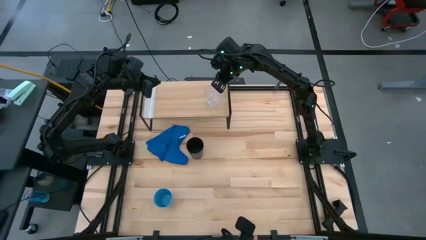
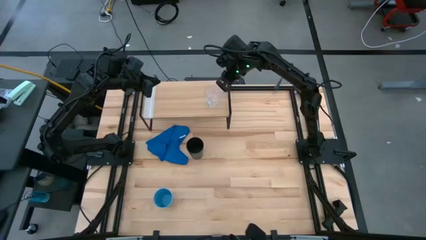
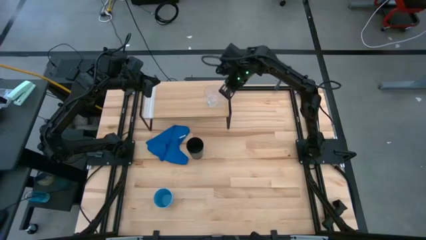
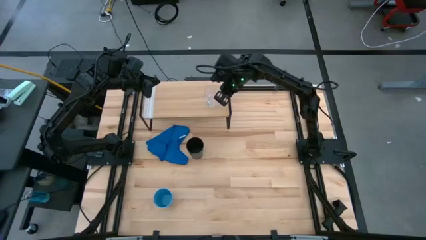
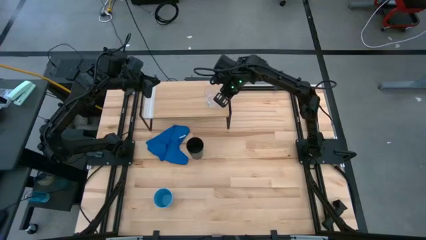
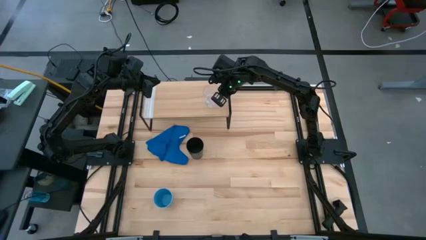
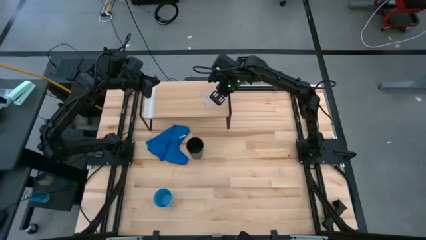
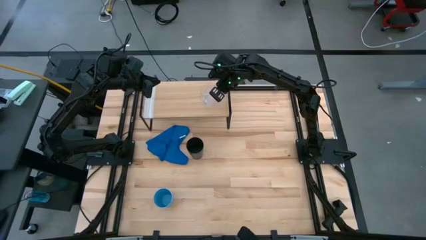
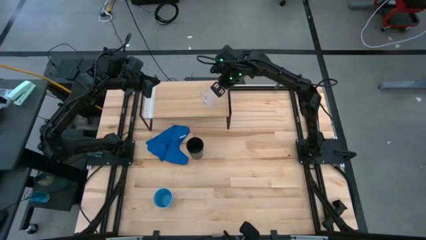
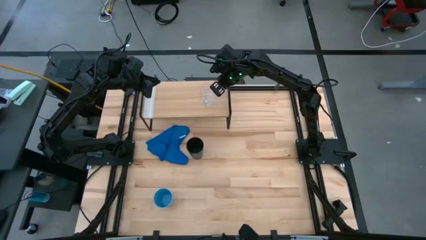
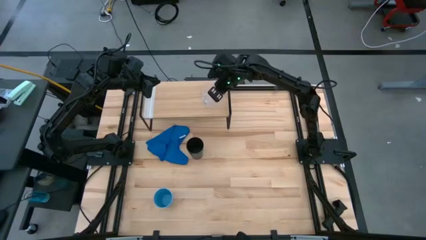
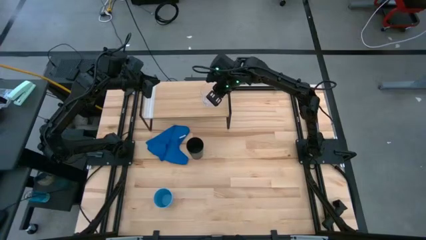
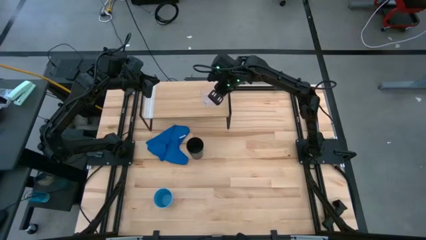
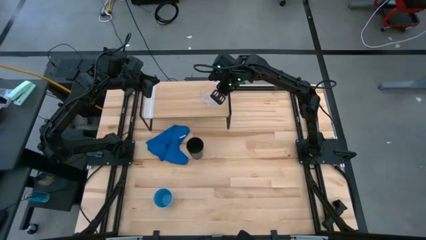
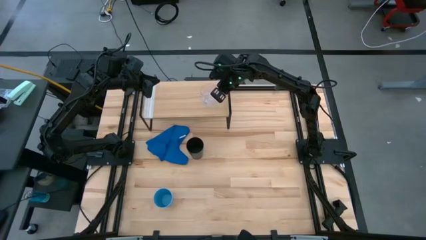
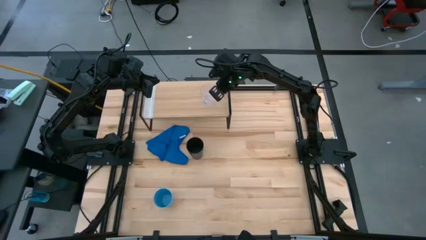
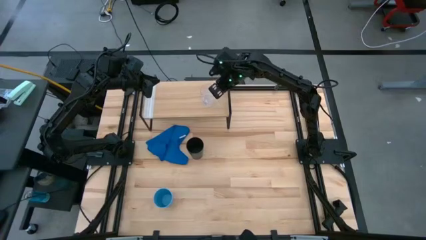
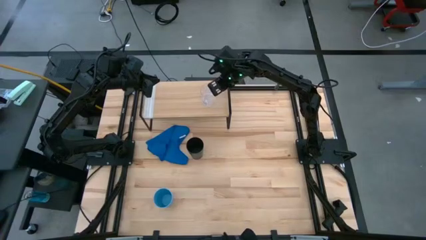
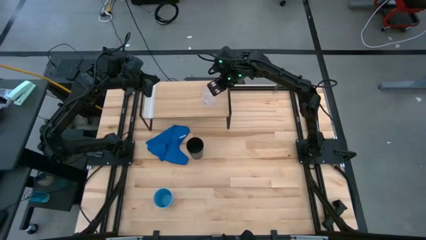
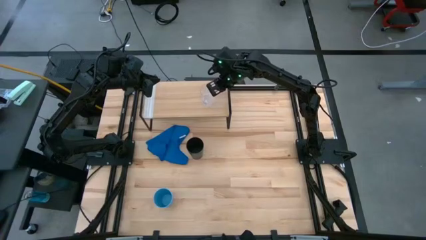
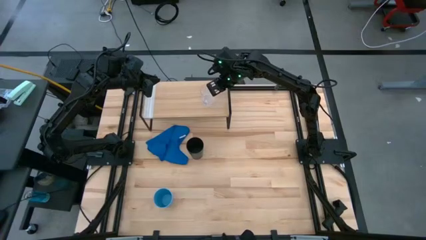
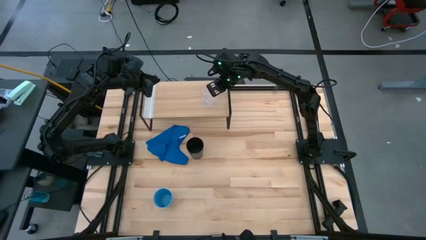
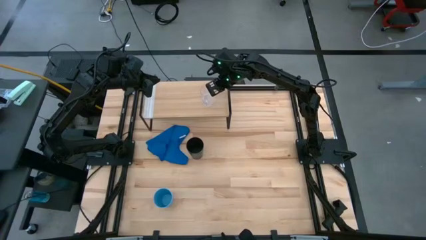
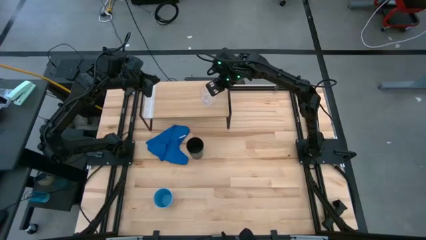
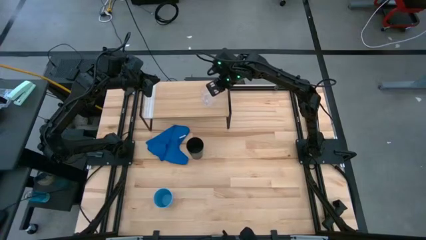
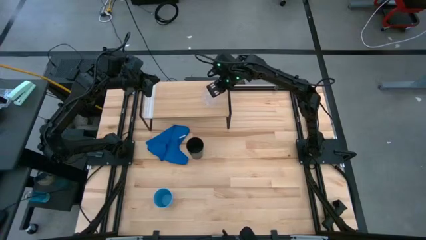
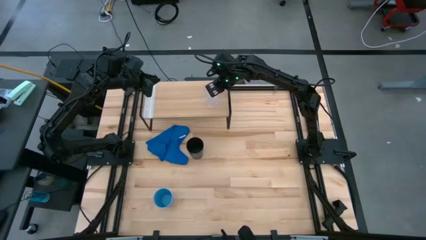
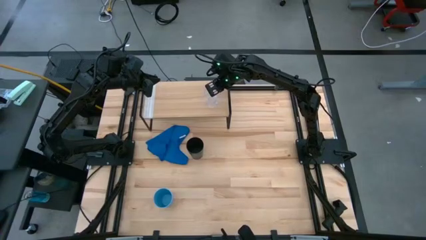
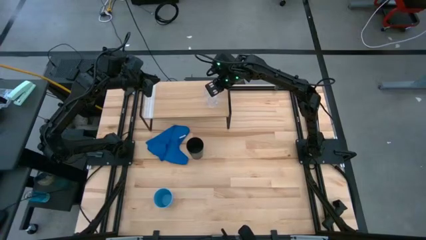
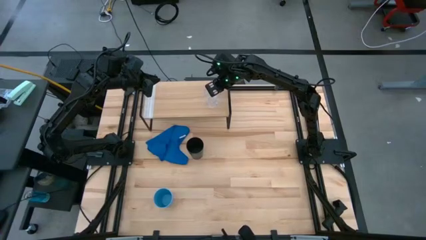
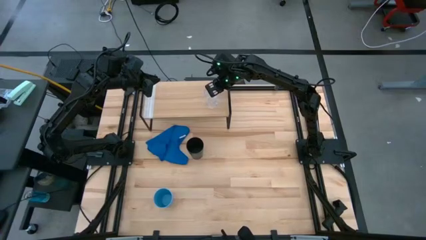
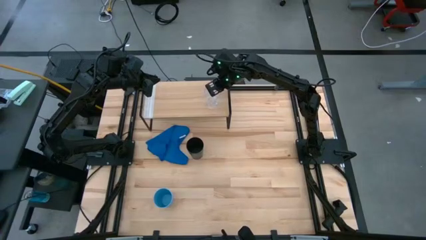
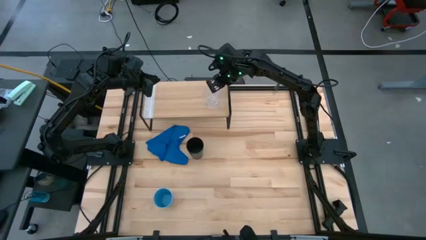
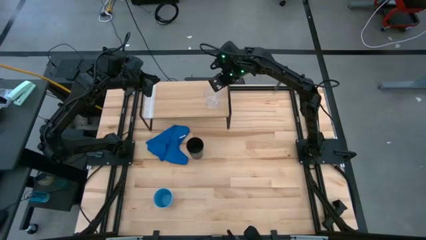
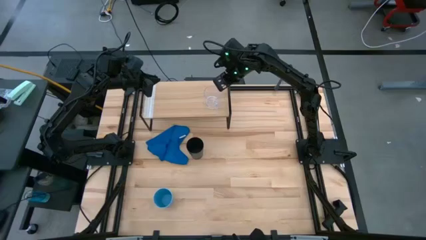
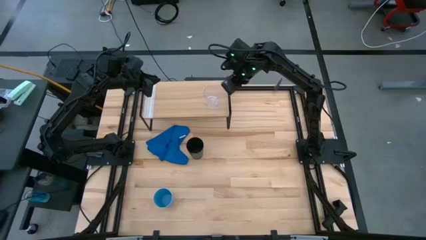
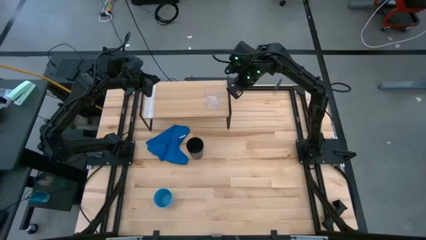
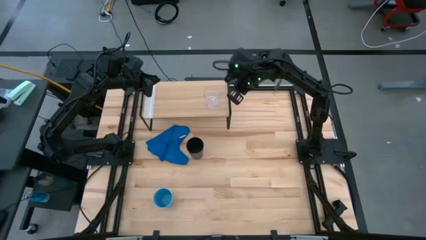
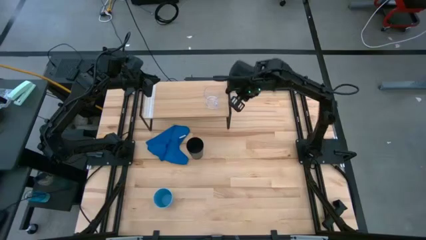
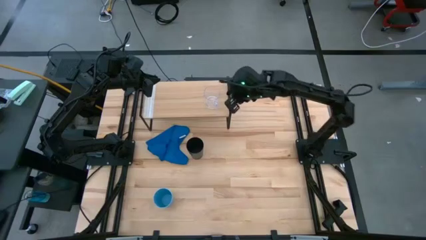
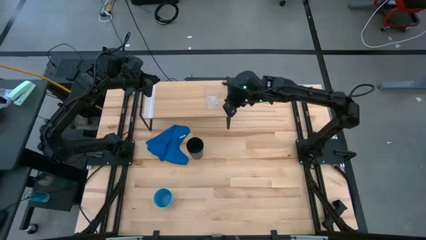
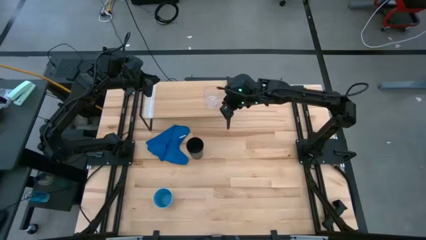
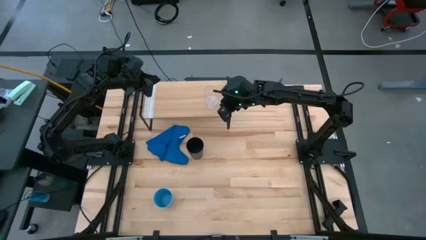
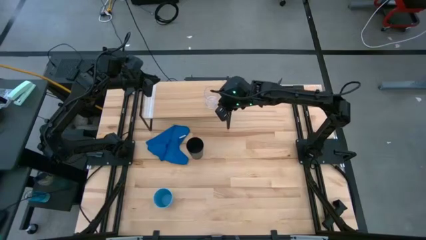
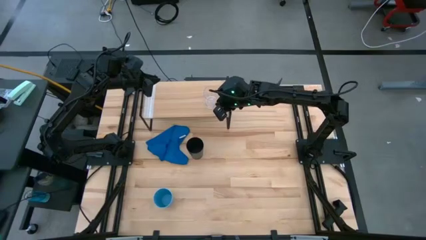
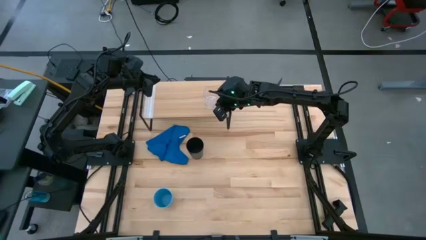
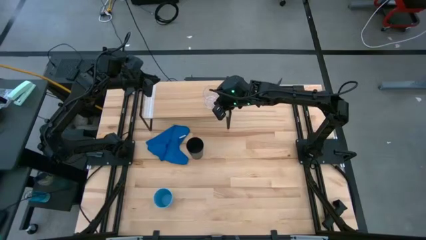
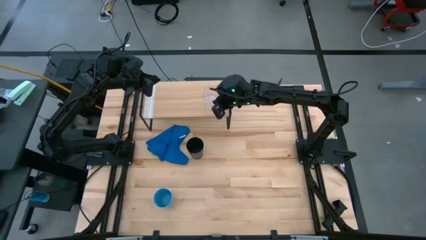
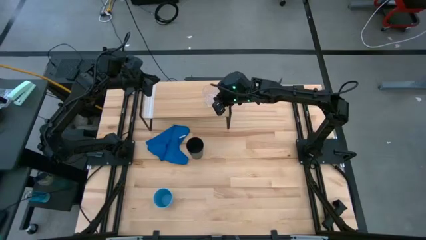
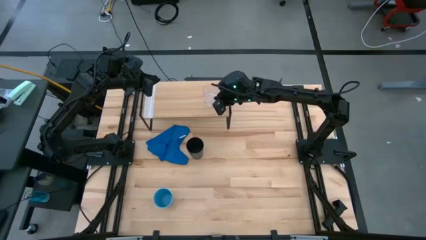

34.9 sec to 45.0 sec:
Task: Stack small to large cups/mugs on shelf
Put the transparent mug on the shelf
